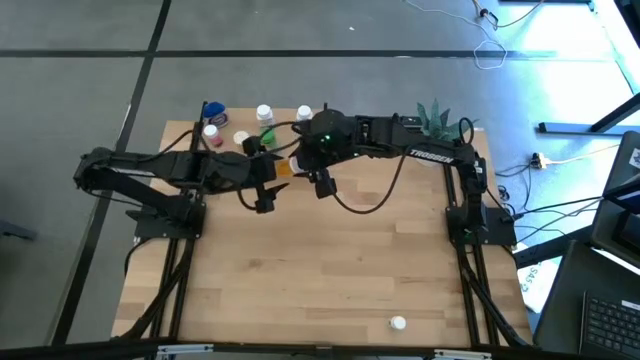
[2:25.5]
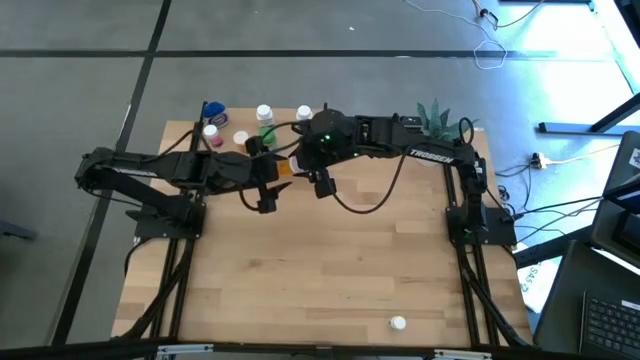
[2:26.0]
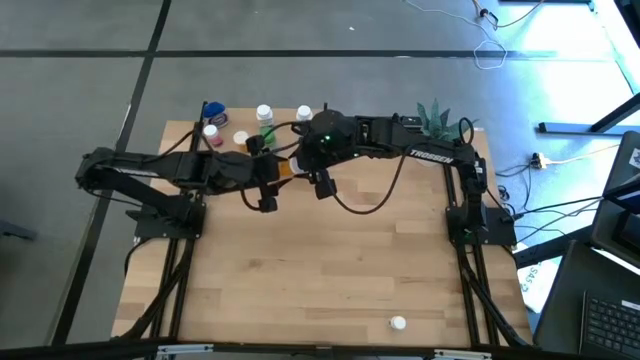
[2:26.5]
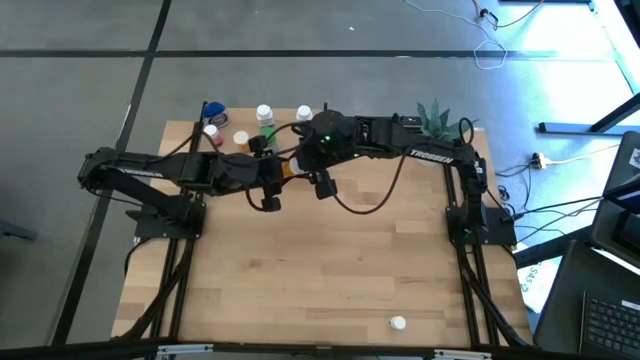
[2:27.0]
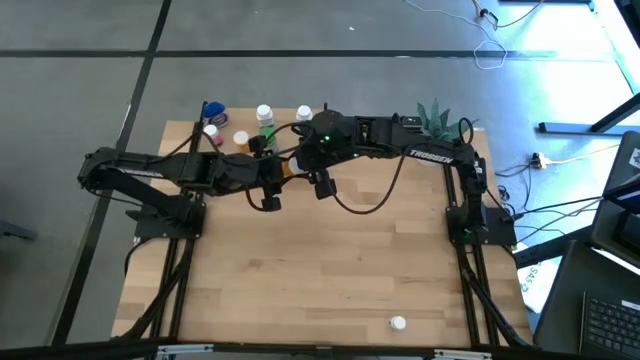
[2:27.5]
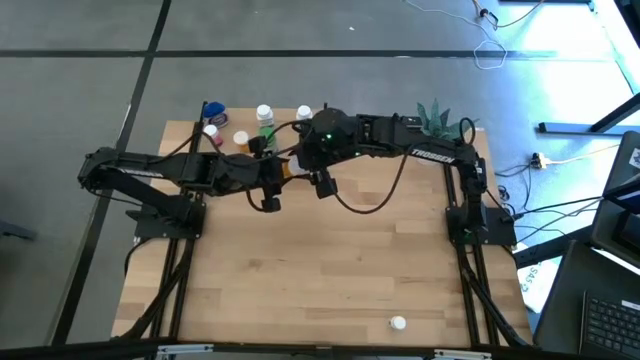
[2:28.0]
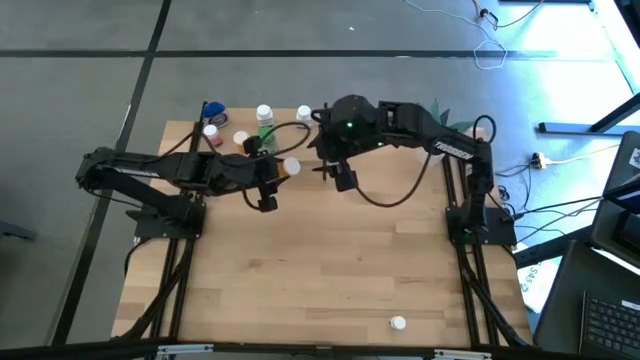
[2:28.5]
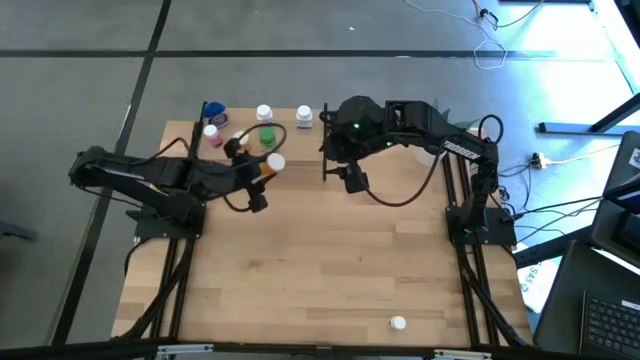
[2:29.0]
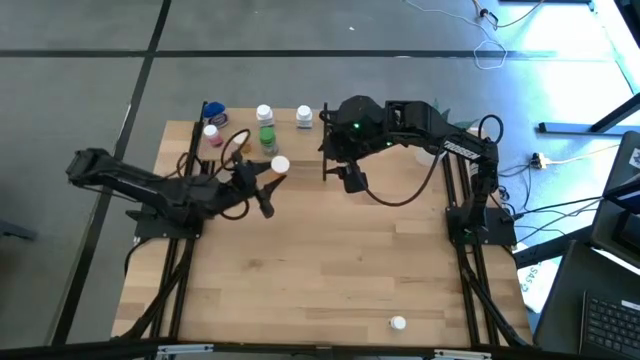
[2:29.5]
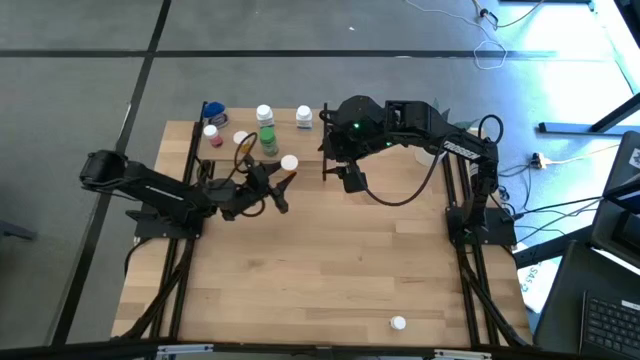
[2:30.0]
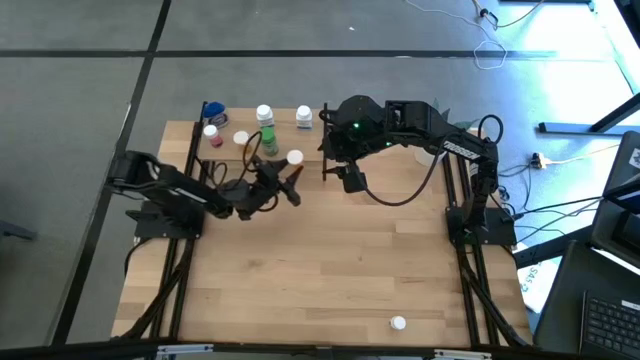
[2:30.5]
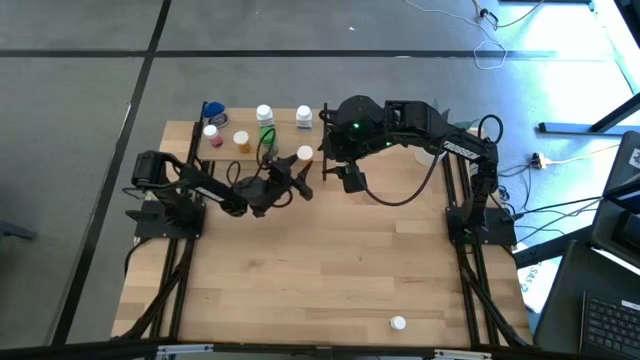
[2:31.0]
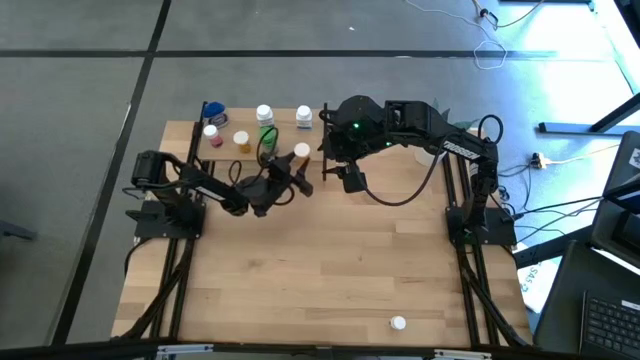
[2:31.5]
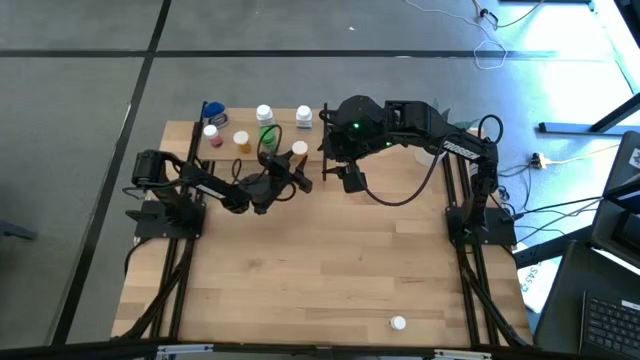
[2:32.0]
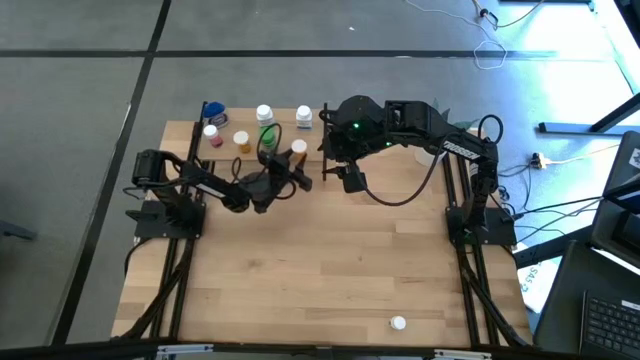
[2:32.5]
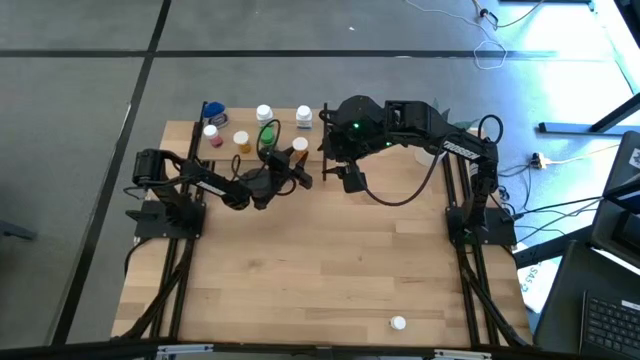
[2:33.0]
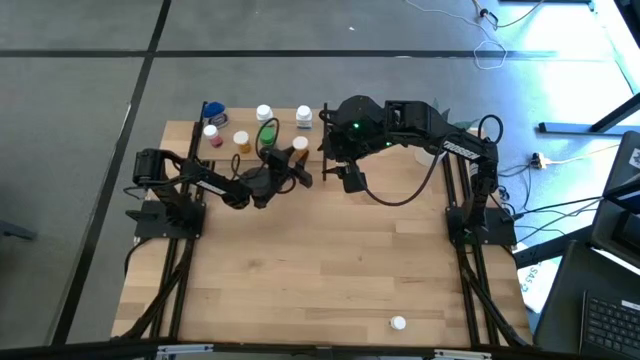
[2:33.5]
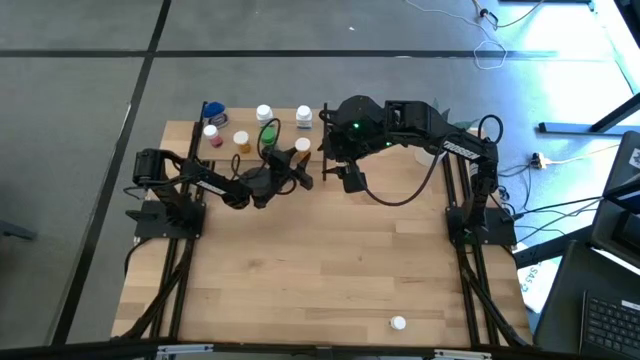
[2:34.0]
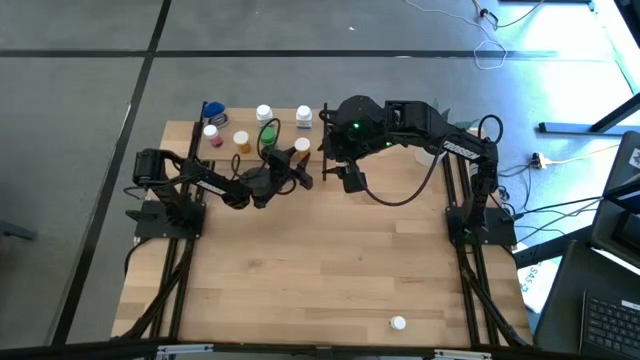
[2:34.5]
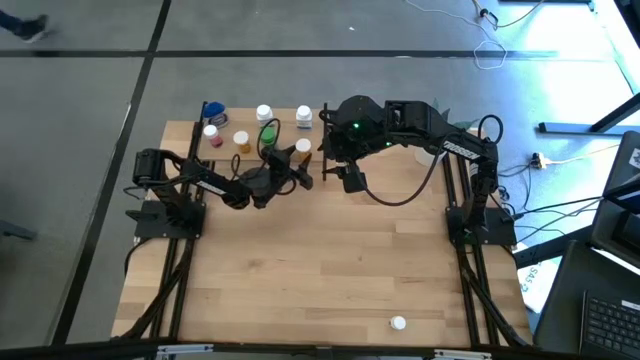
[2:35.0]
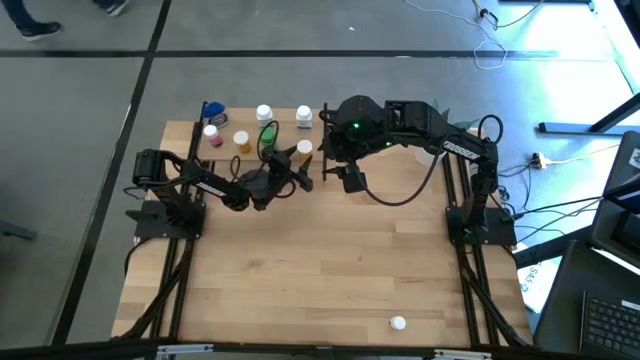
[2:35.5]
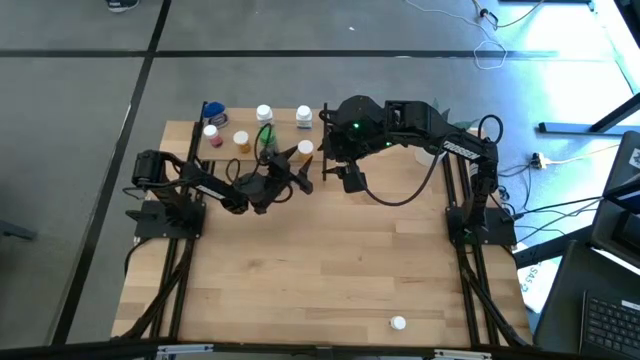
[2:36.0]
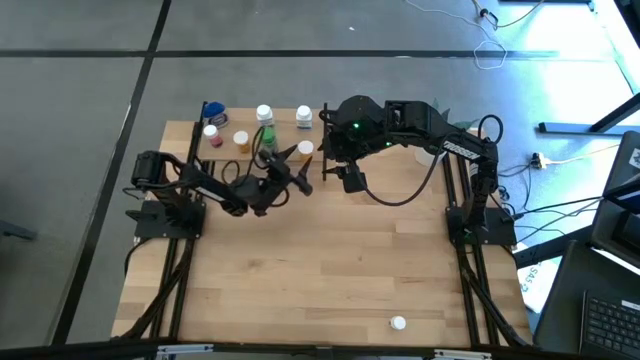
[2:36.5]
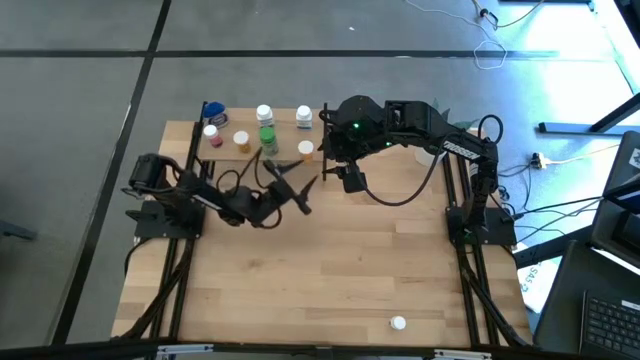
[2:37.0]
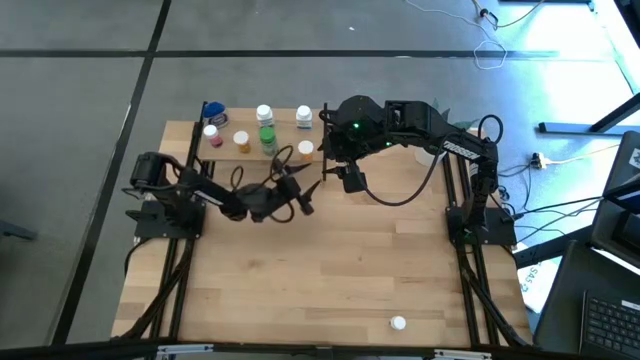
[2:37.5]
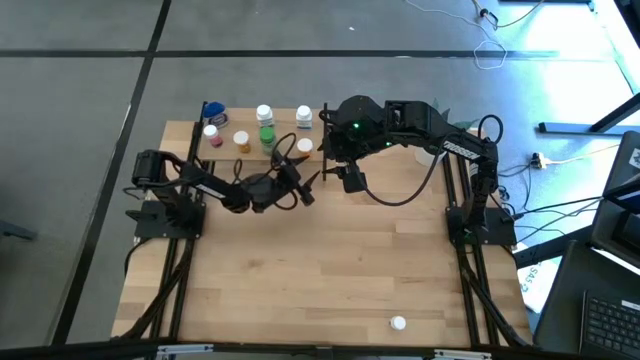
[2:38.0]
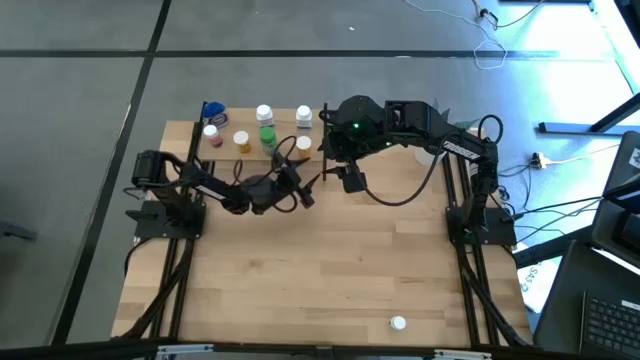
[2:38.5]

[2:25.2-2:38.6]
Task: Pick and place medicine bottles onto shelf by color
Put the orange pill bottle on the shelf

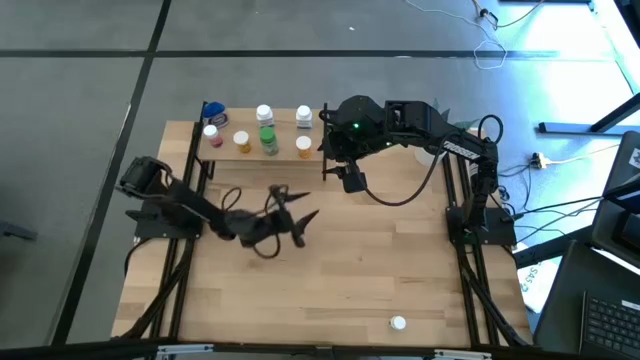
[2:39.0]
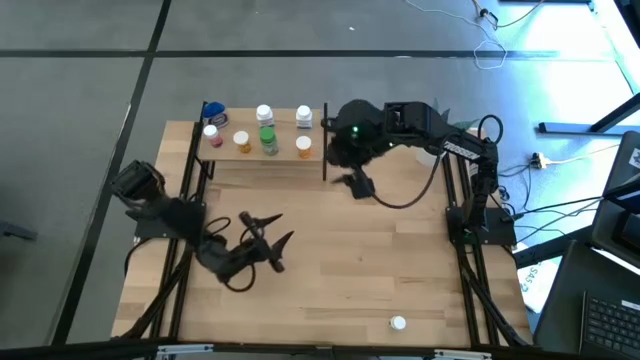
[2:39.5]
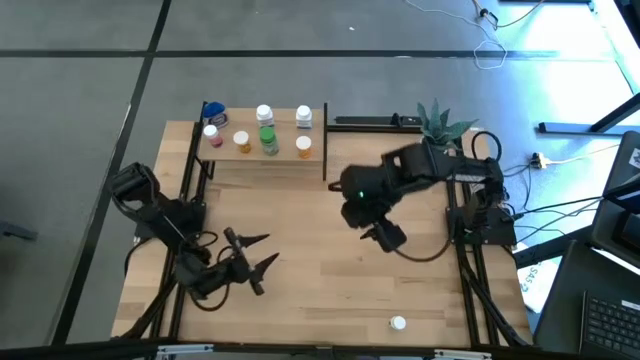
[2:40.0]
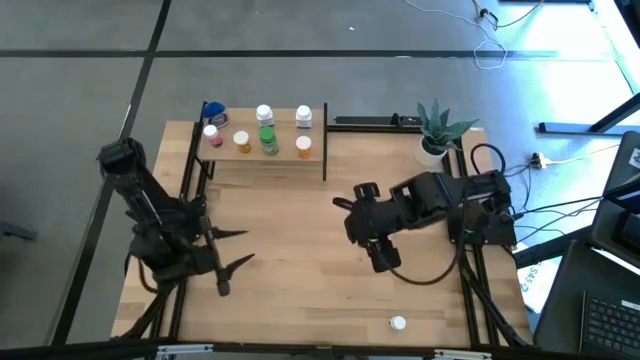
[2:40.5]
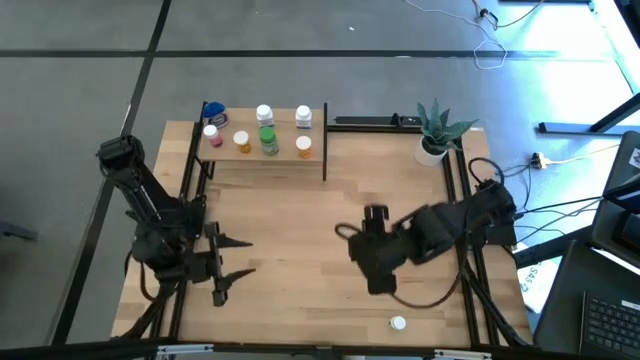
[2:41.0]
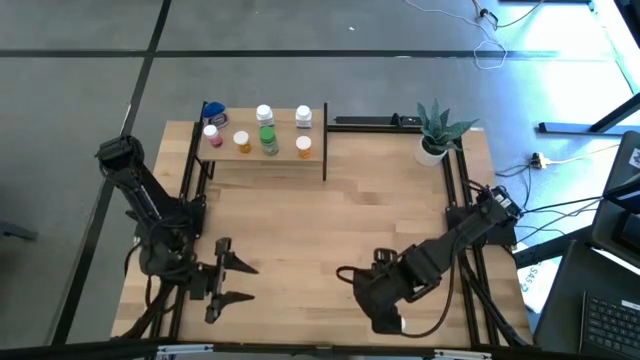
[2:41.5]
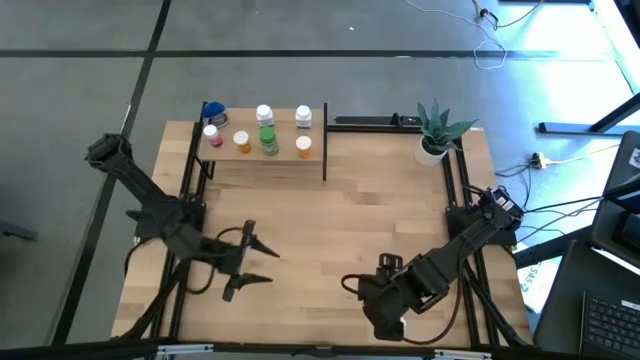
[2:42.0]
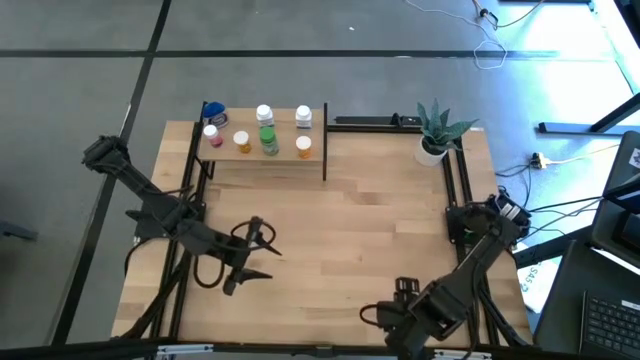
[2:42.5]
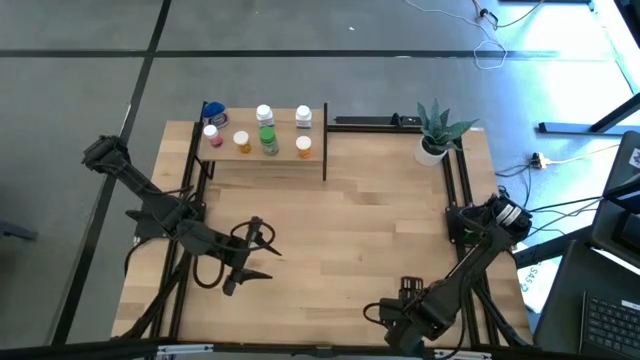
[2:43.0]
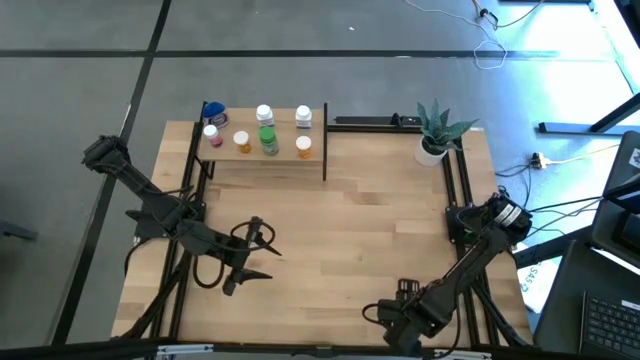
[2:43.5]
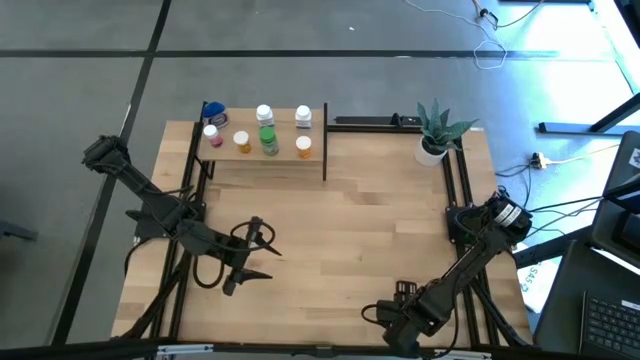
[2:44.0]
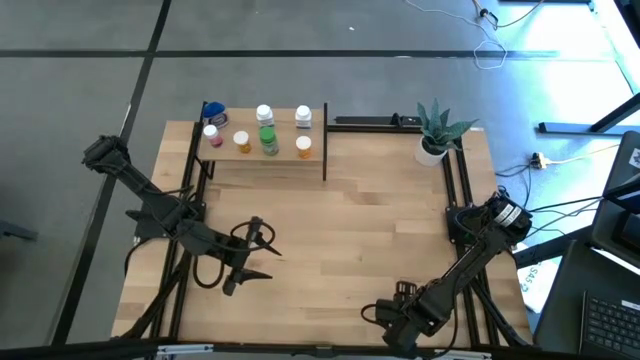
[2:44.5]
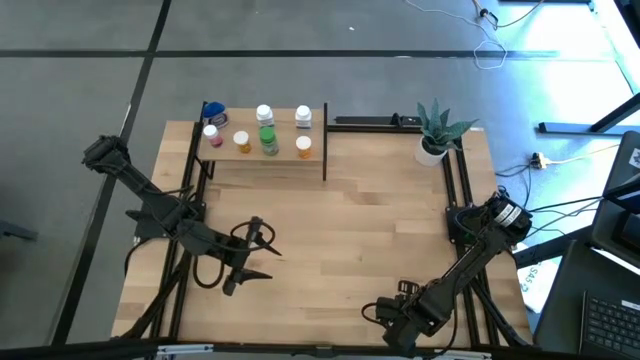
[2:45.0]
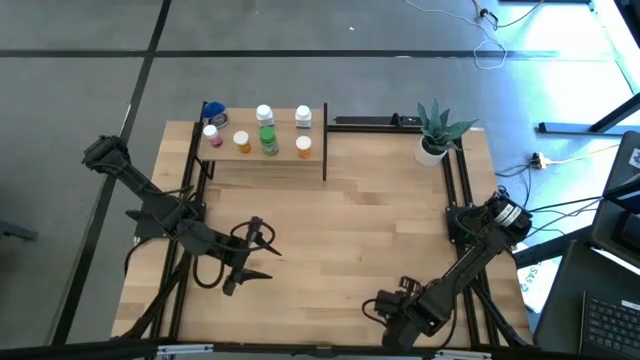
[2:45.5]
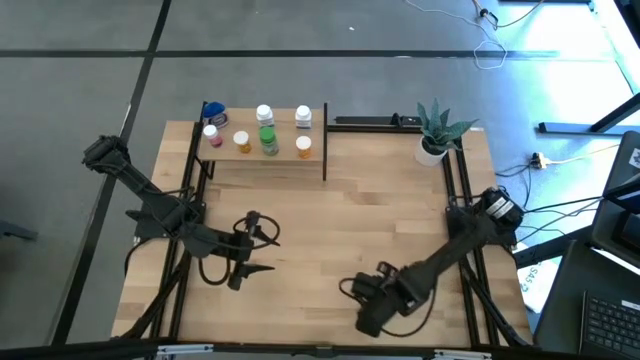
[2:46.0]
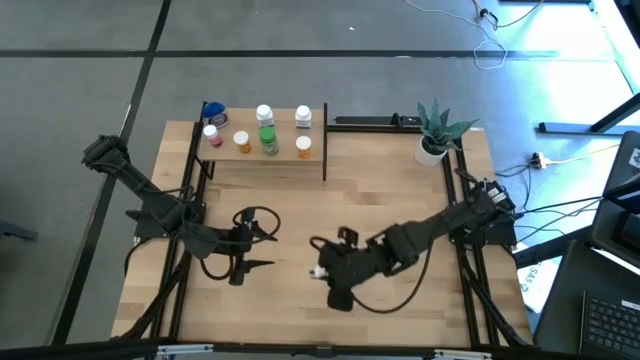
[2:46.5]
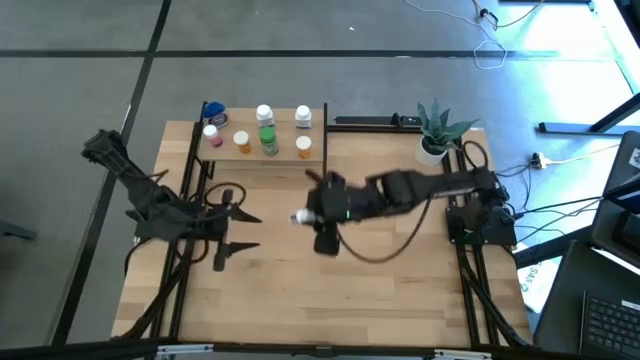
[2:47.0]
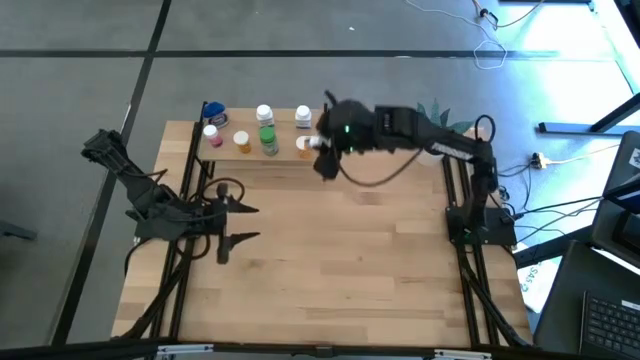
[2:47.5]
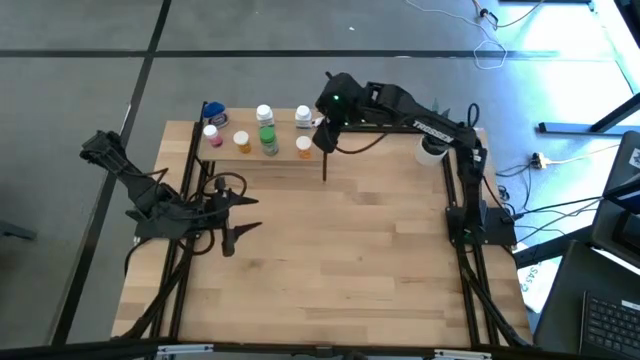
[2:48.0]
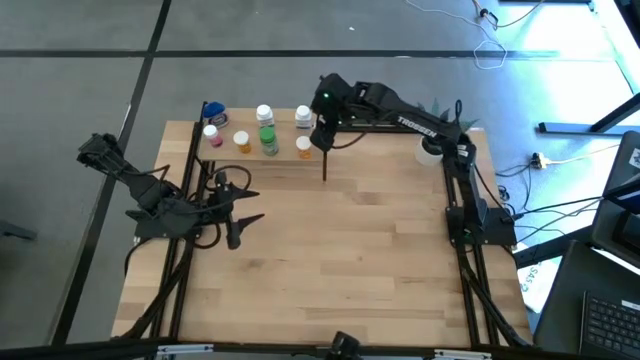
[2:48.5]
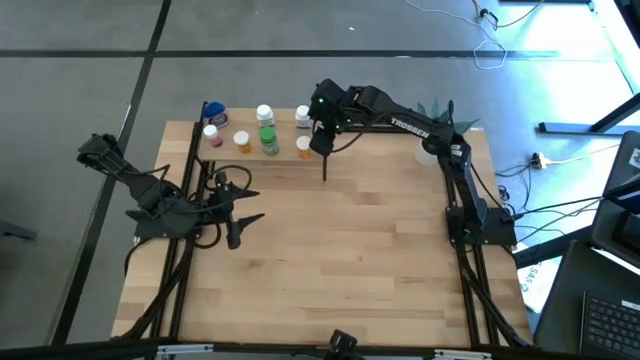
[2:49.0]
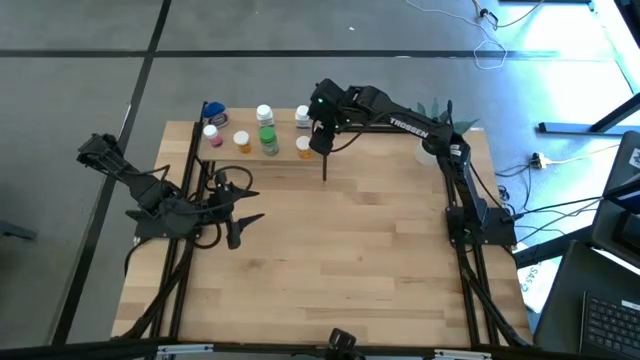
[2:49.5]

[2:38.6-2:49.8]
Put the white and black pill bottle on the shelf
